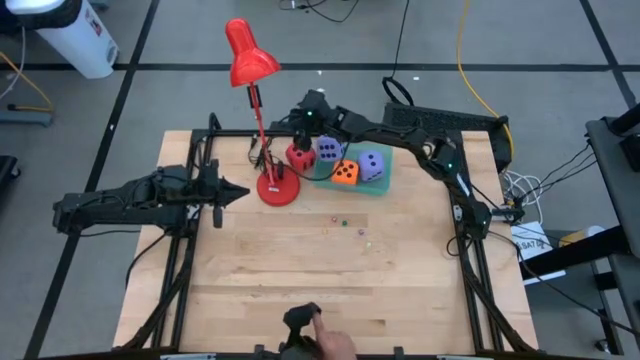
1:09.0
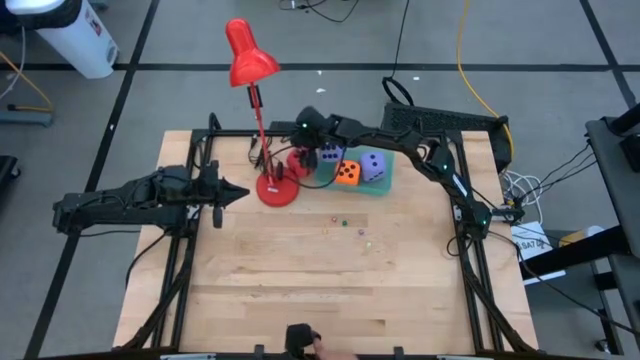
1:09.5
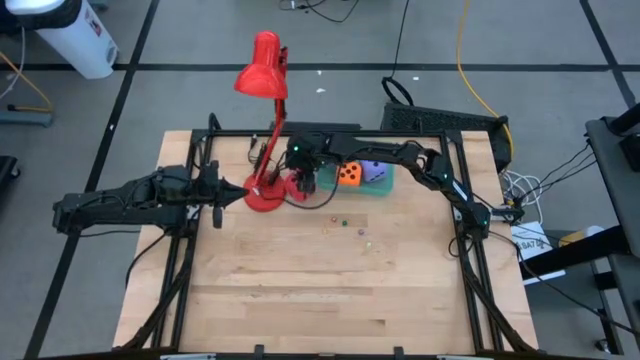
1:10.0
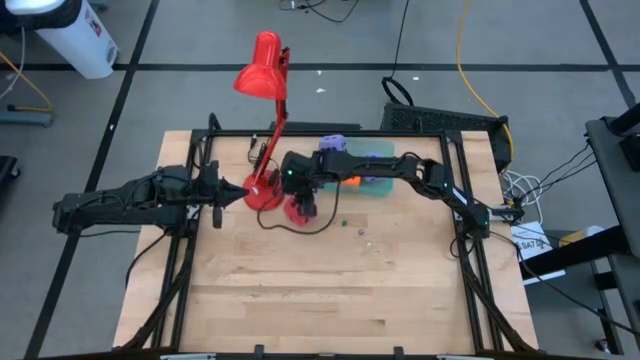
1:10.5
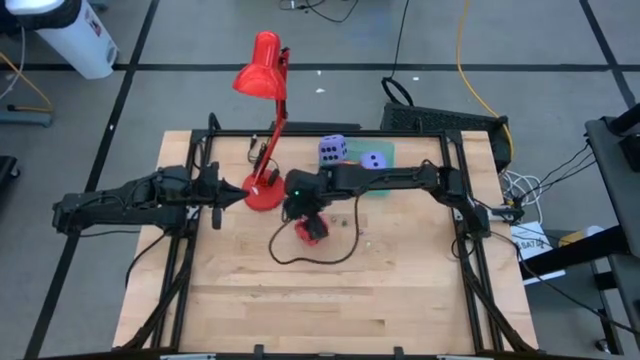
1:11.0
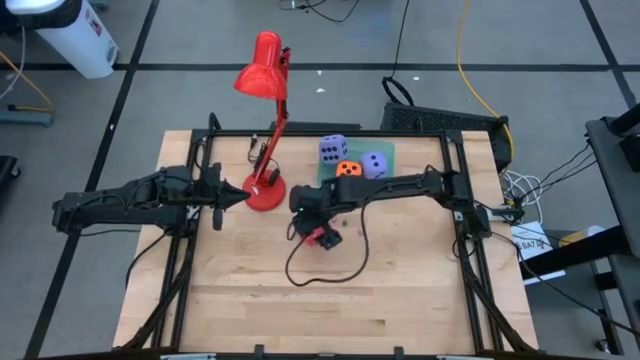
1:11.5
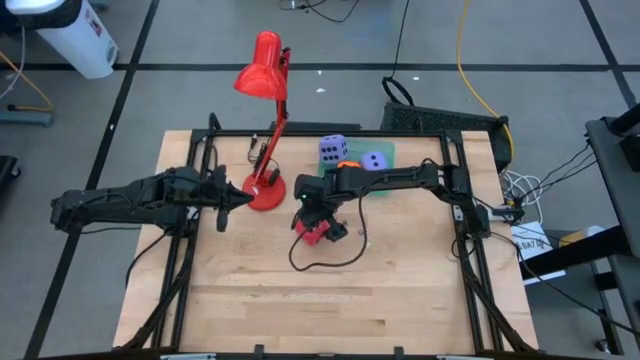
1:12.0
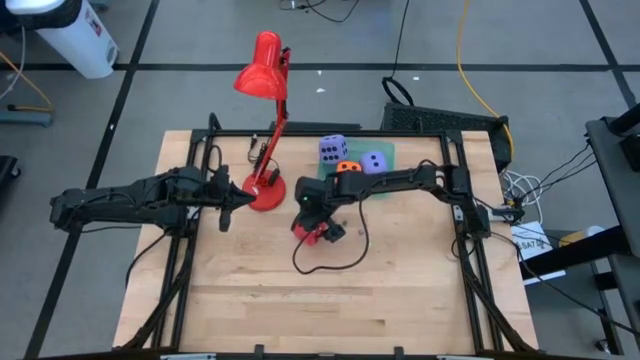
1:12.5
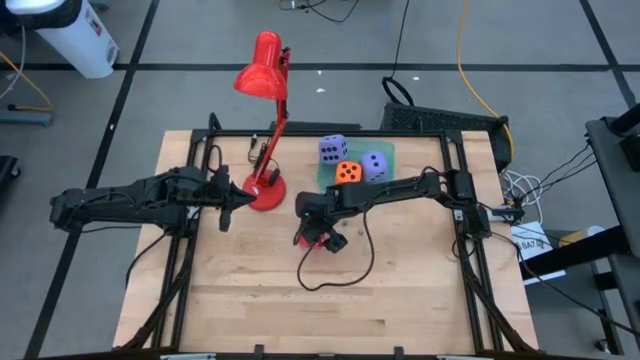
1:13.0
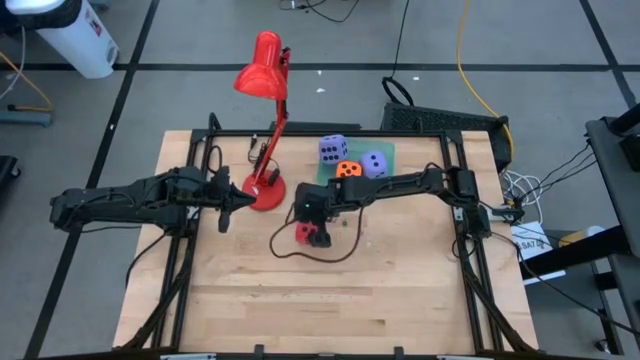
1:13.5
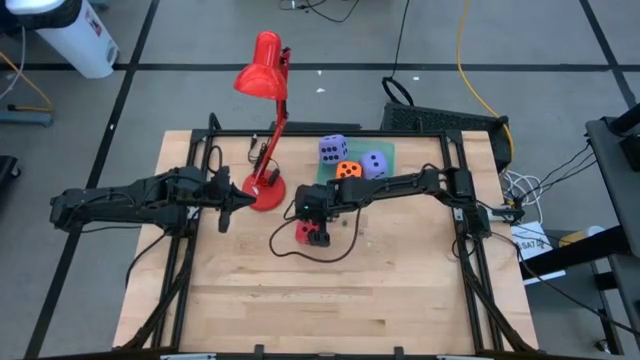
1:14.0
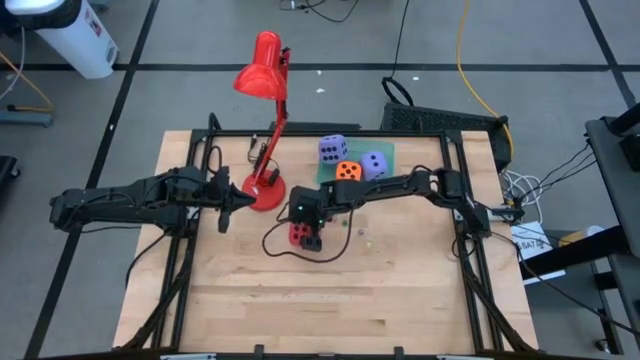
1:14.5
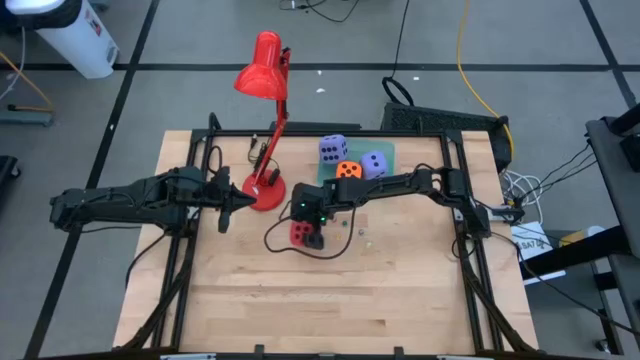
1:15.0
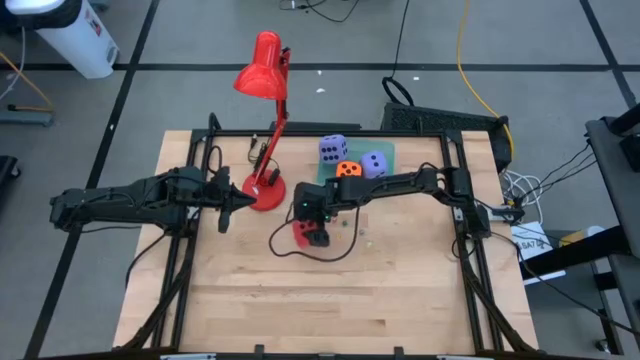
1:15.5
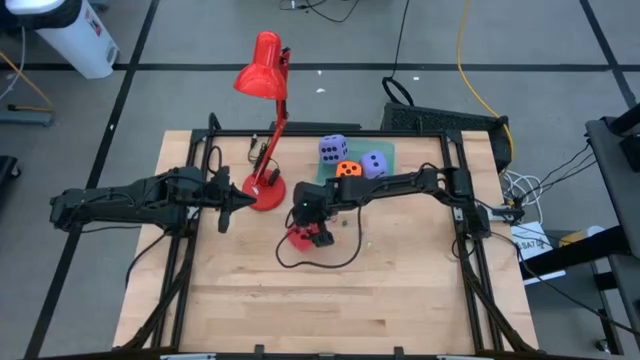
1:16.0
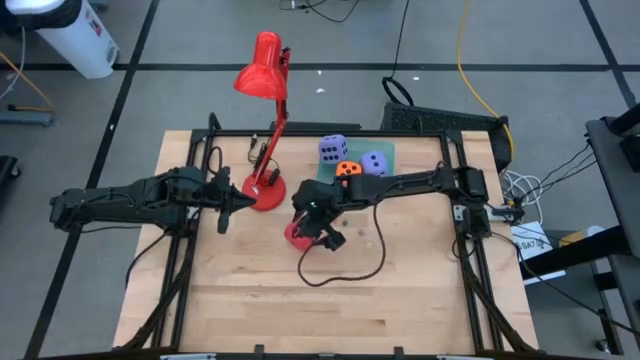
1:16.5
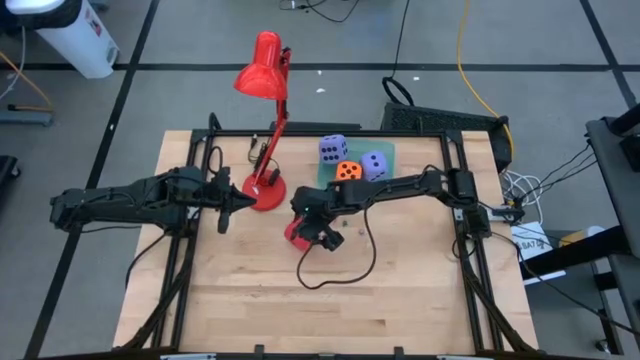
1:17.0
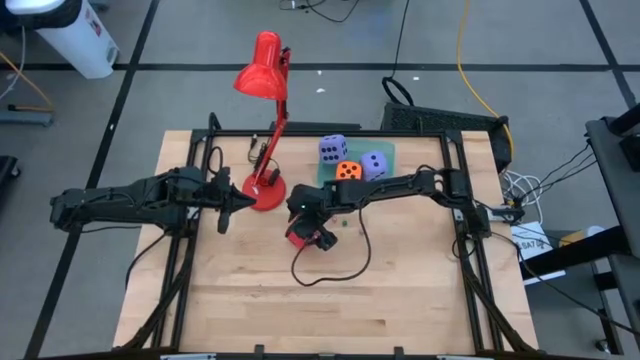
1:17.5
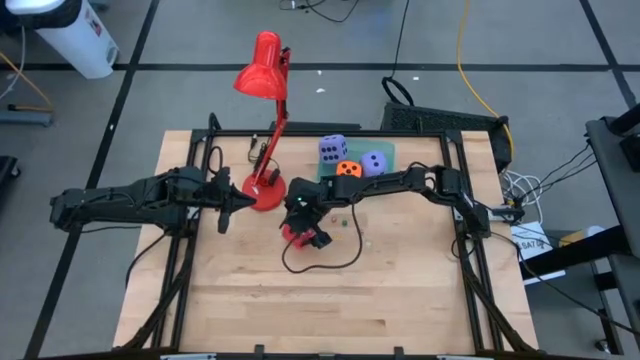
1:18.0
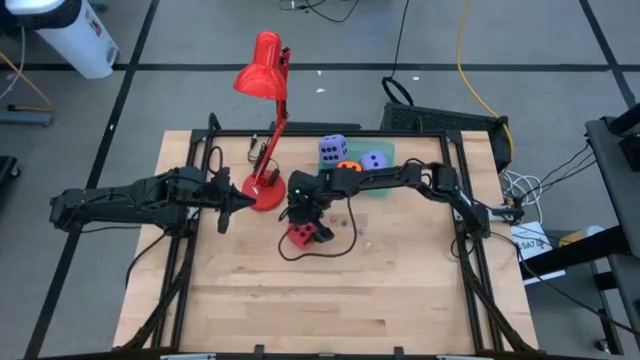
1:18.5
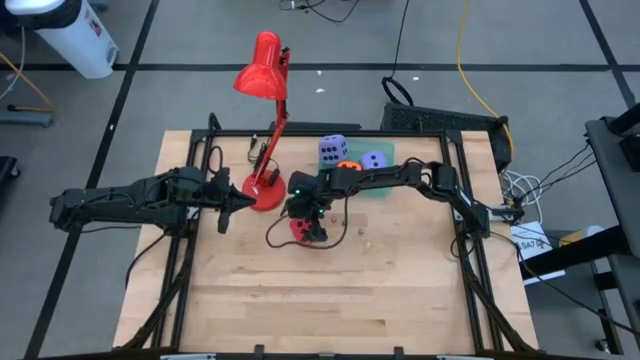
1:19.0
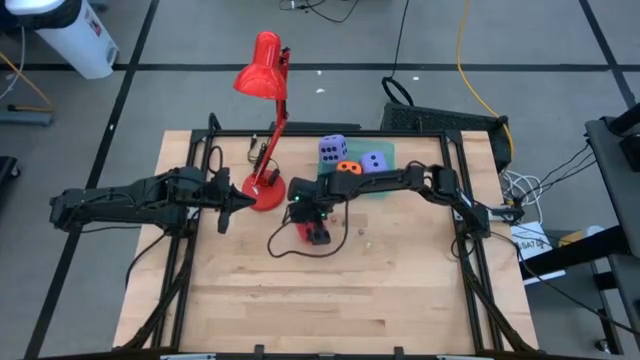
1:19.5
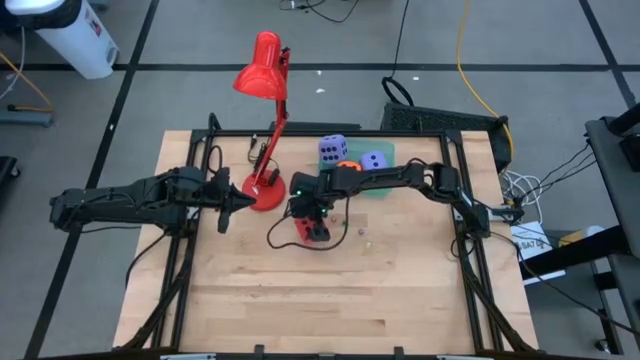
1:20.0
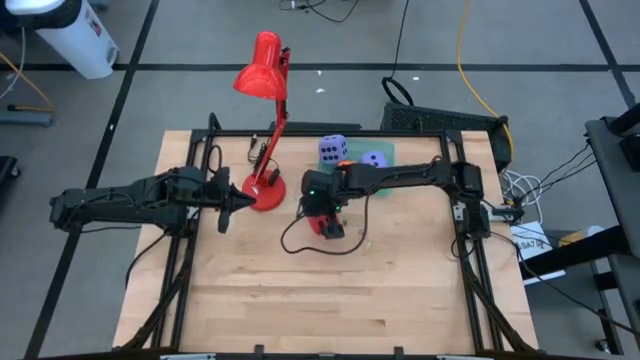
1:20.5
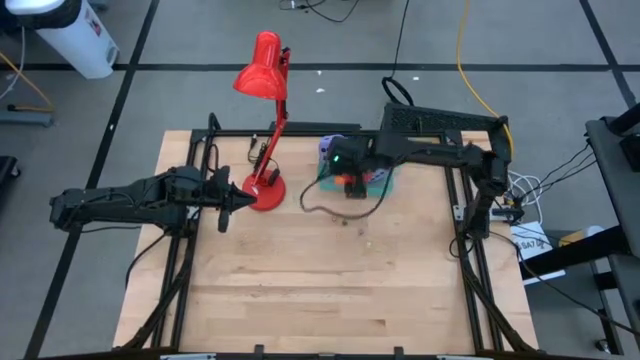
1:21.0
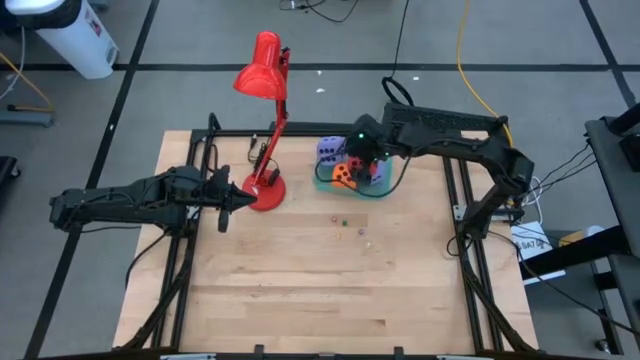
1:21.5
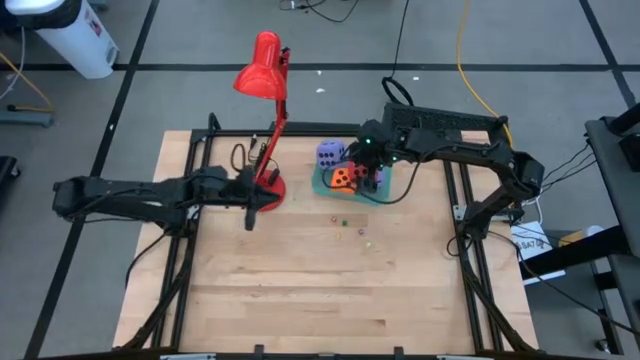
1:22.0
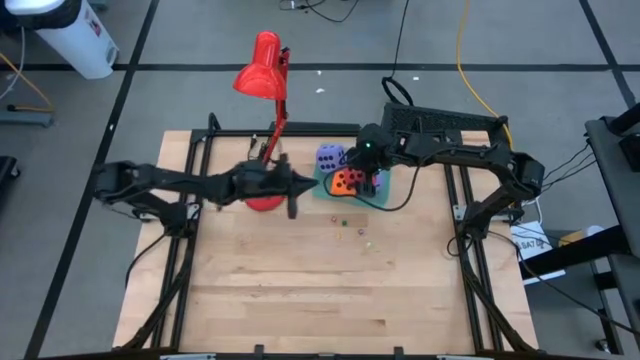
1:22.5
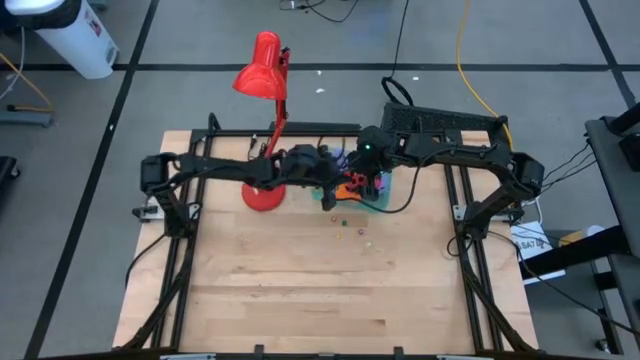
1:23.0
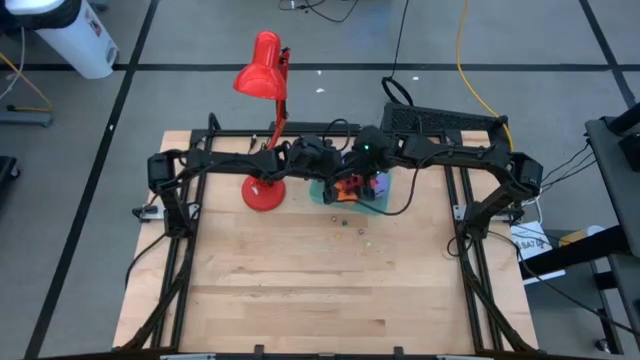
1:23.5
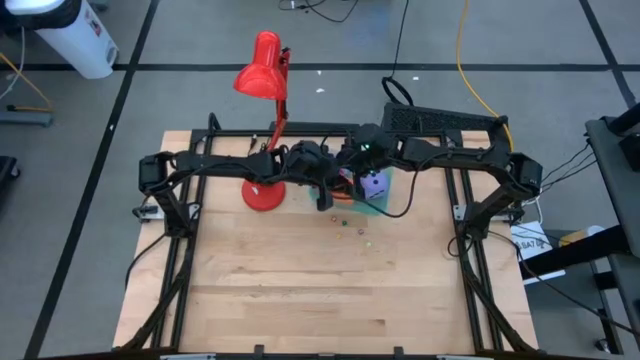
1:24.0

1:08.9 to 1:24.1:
Task: Pick & Place Dice
Put the big red dice into the green bin

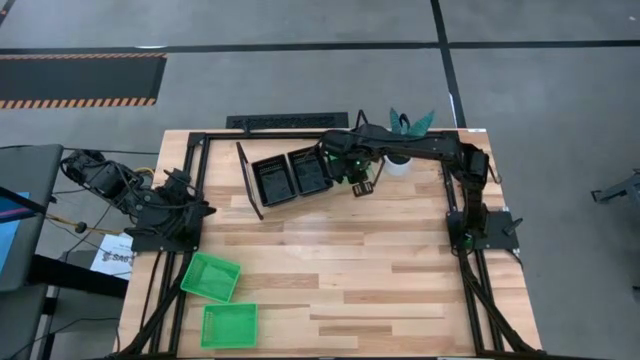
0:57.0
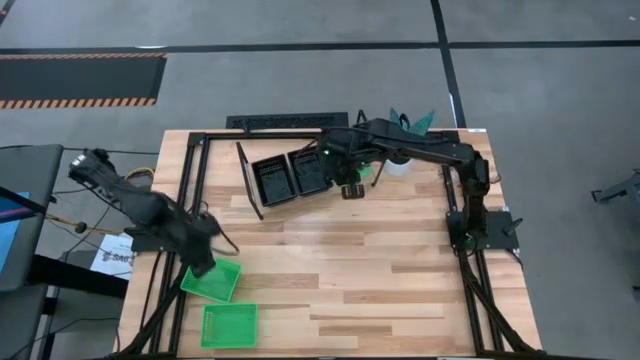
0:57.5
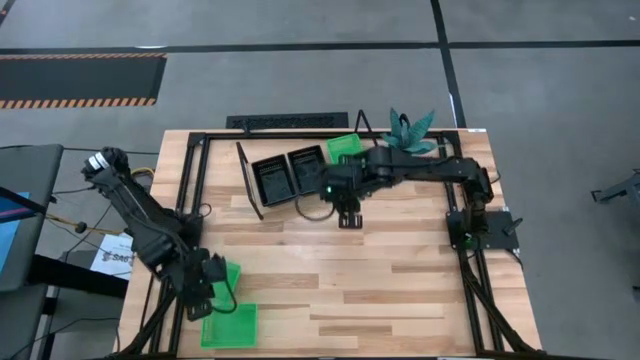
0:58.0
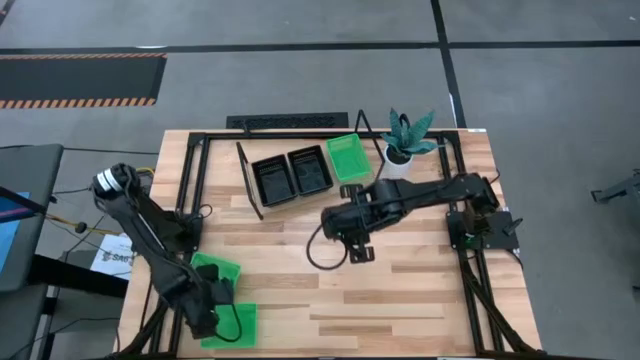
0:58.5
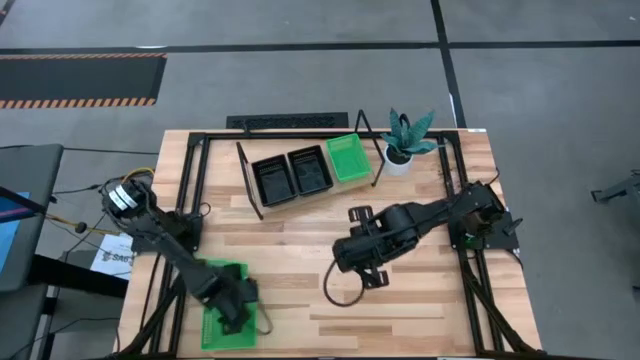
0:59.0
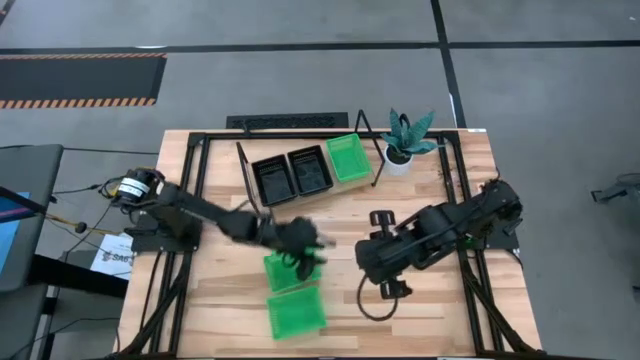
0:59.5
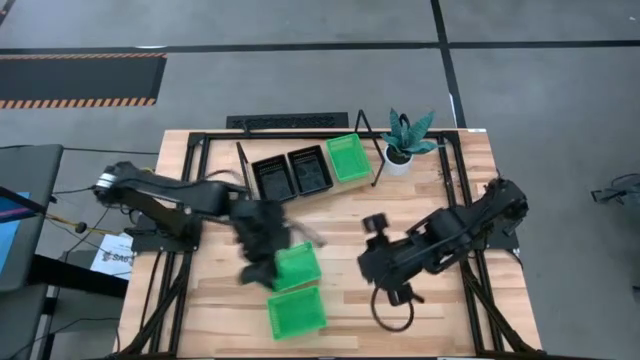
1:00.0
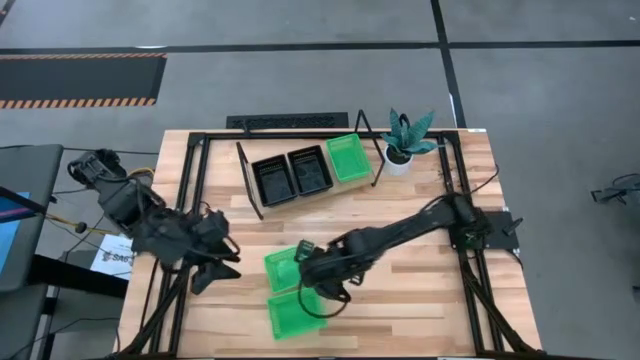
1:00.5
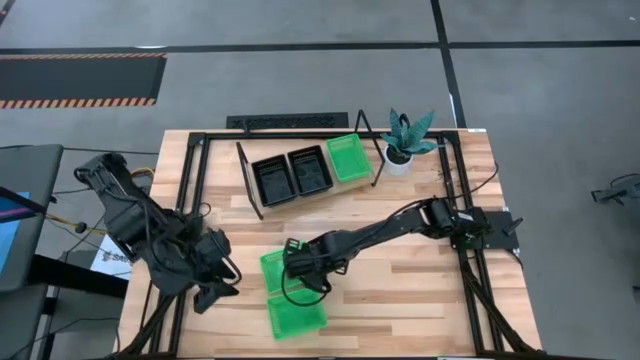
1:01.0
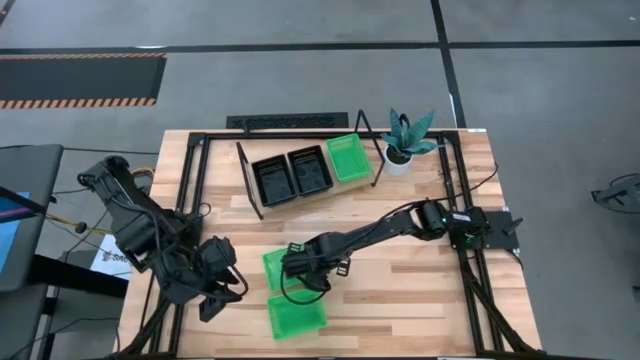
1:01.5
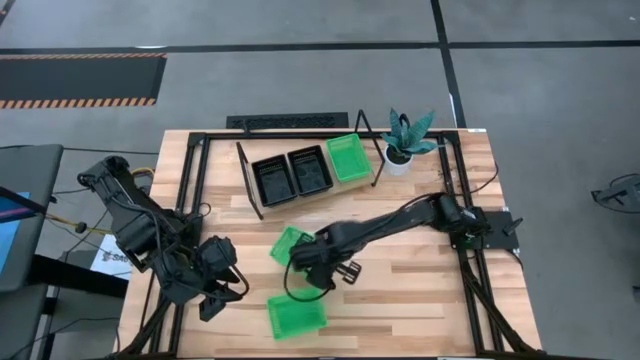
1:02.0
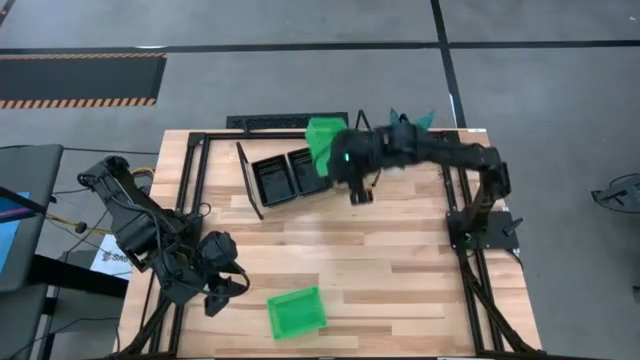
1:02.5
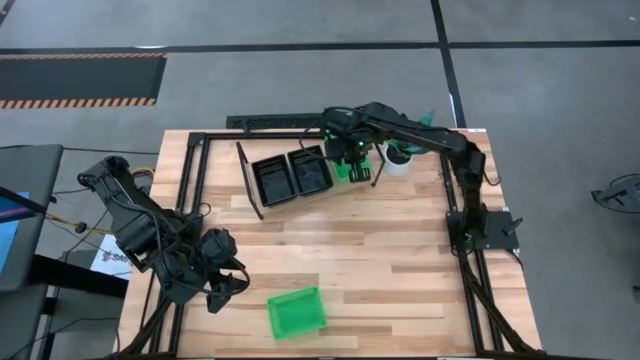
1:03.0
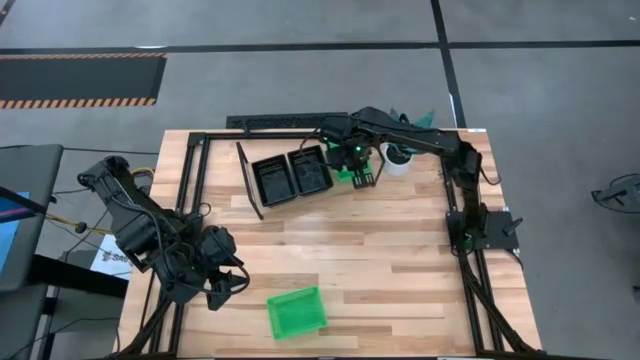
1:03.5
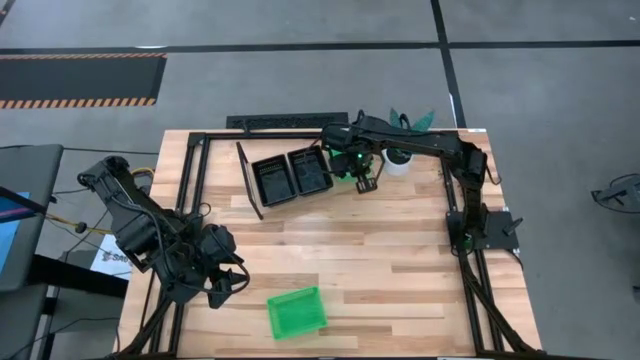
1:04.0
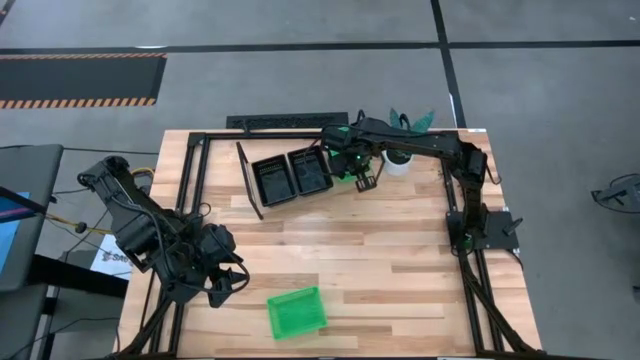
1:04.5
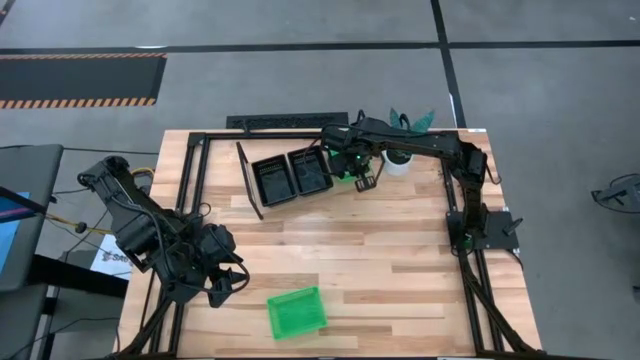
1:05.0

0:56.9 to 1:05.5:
Task: Stack baskets on shelf by color
Stack the top green bin on the green bin on the shelf
